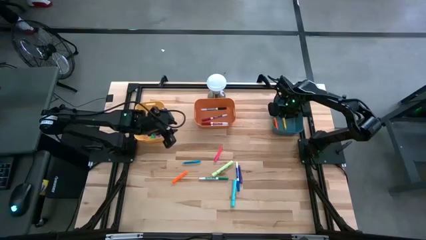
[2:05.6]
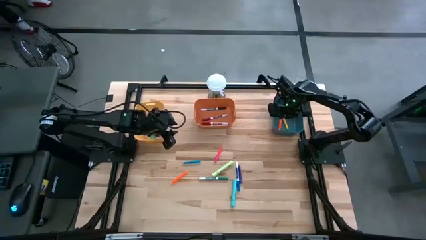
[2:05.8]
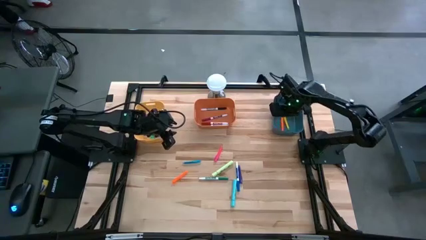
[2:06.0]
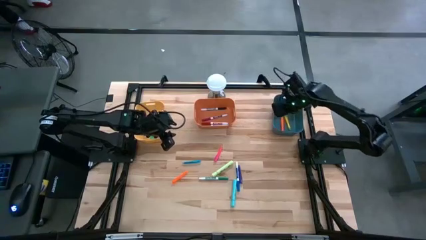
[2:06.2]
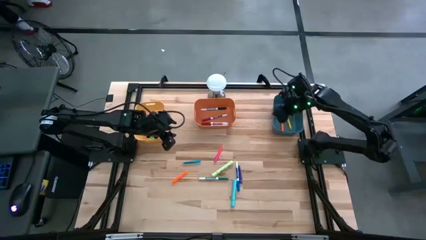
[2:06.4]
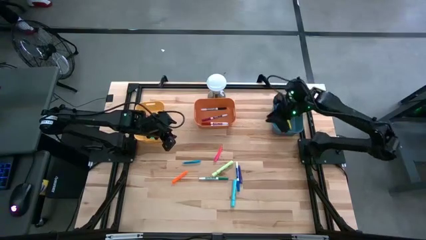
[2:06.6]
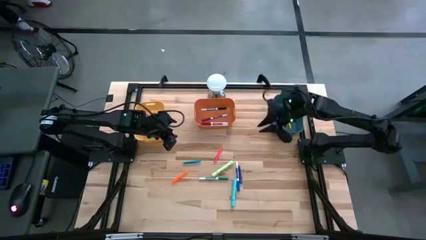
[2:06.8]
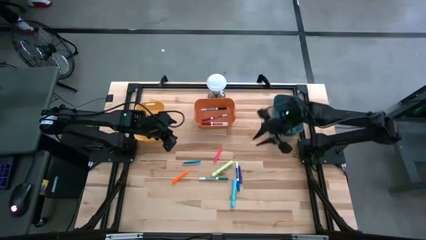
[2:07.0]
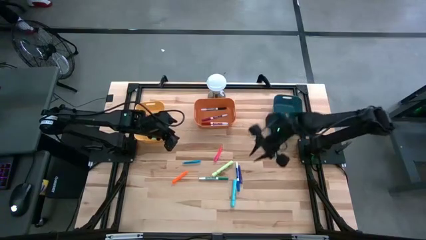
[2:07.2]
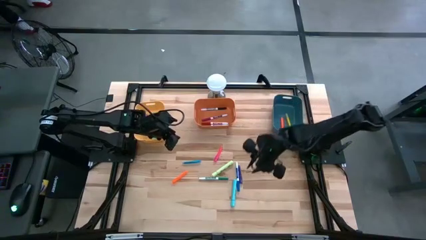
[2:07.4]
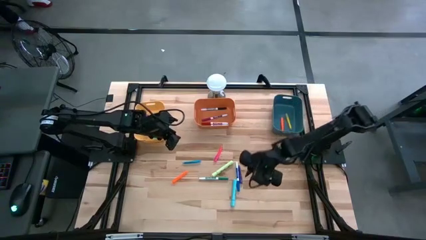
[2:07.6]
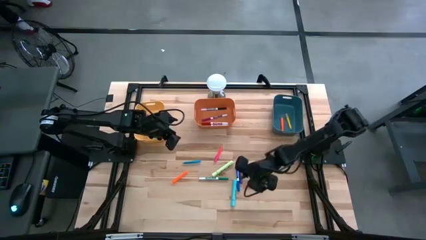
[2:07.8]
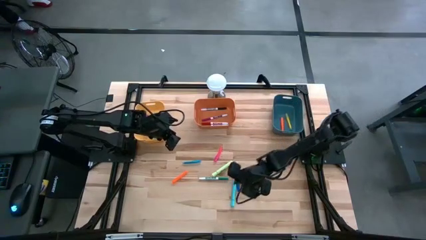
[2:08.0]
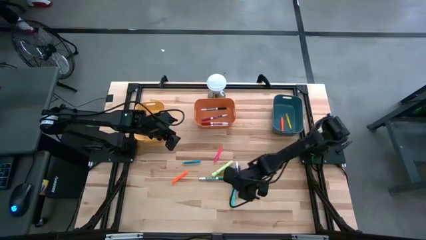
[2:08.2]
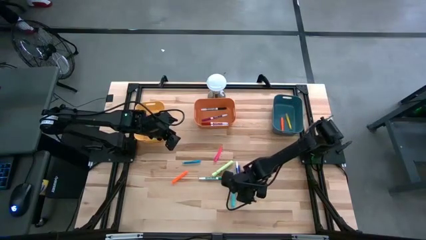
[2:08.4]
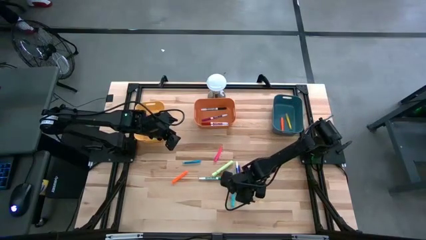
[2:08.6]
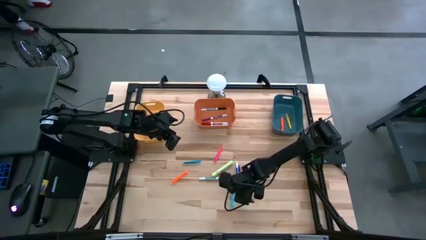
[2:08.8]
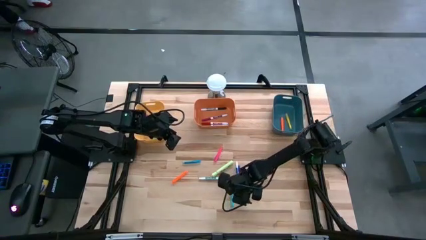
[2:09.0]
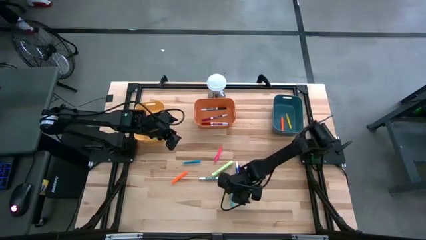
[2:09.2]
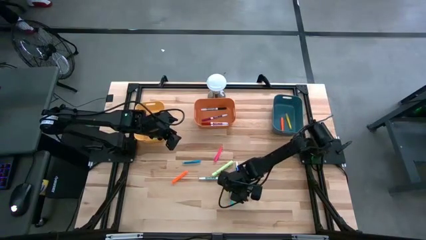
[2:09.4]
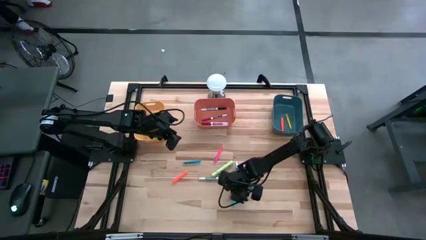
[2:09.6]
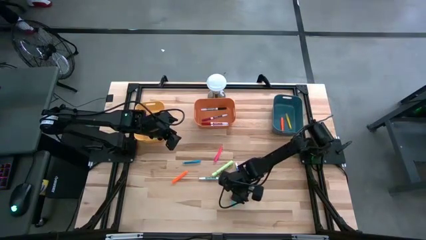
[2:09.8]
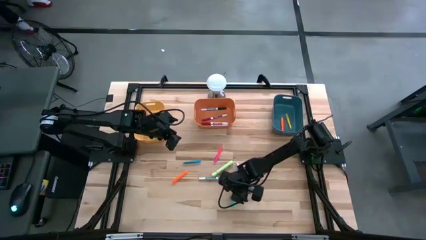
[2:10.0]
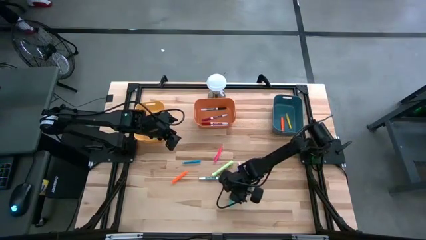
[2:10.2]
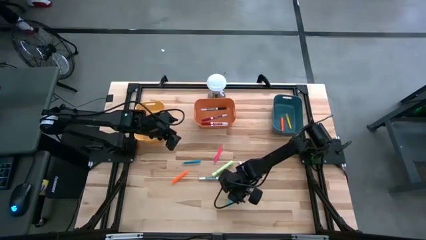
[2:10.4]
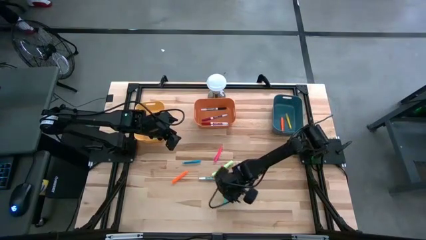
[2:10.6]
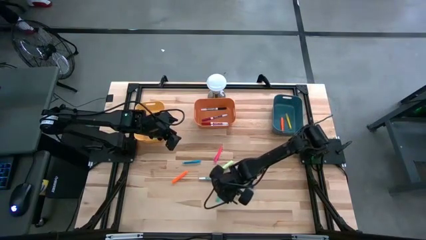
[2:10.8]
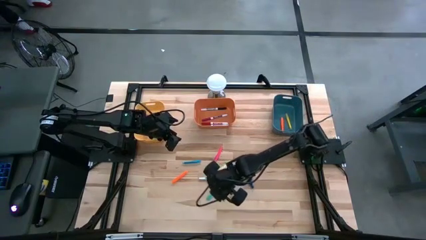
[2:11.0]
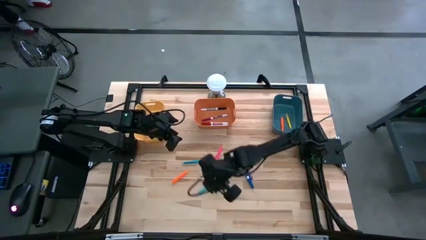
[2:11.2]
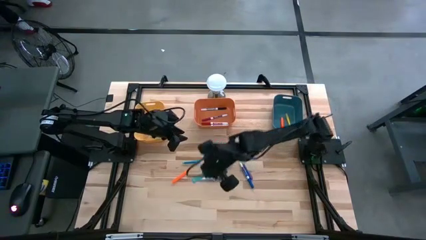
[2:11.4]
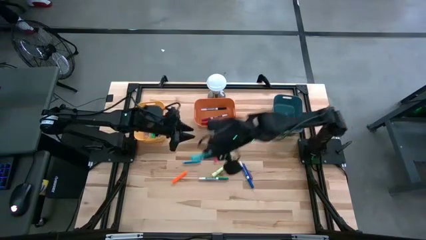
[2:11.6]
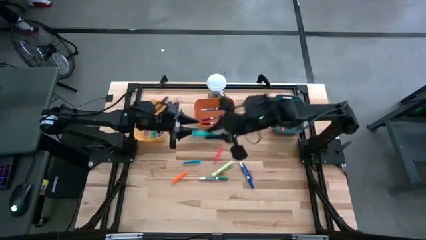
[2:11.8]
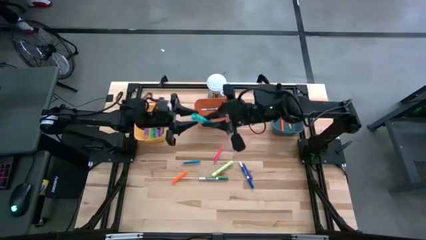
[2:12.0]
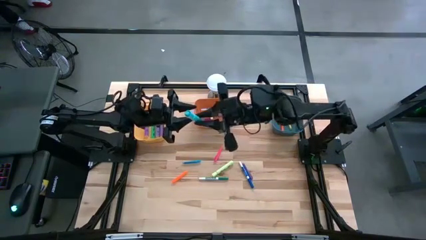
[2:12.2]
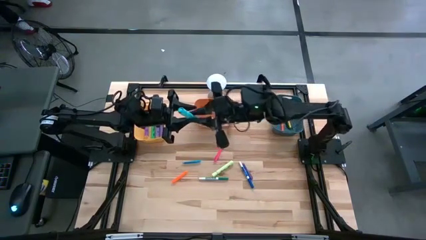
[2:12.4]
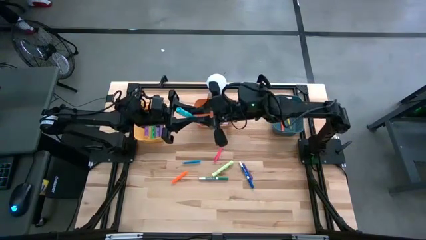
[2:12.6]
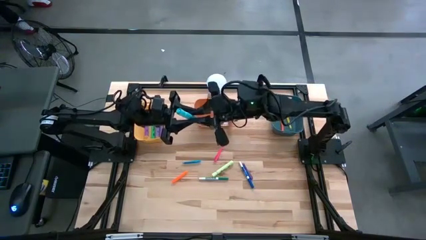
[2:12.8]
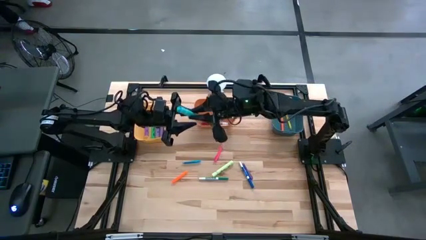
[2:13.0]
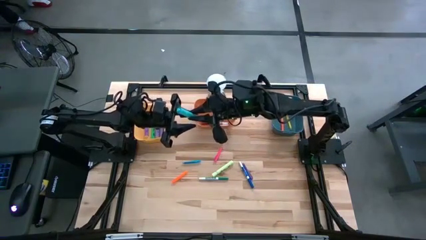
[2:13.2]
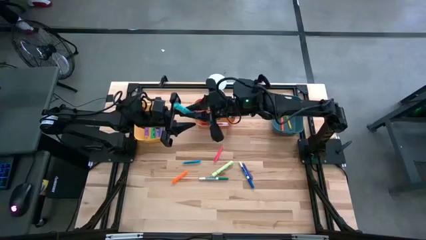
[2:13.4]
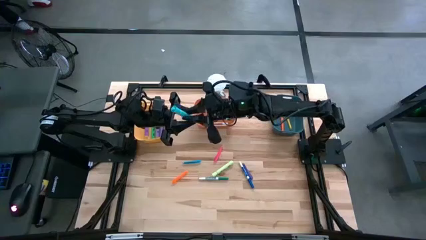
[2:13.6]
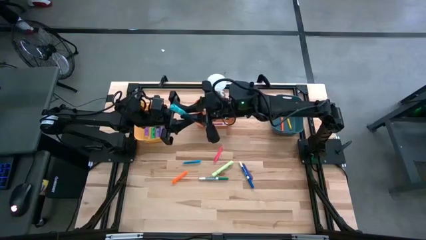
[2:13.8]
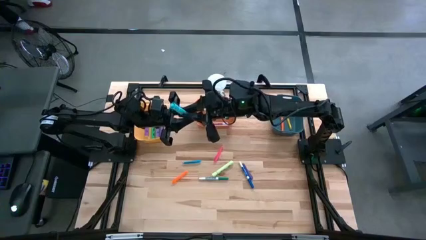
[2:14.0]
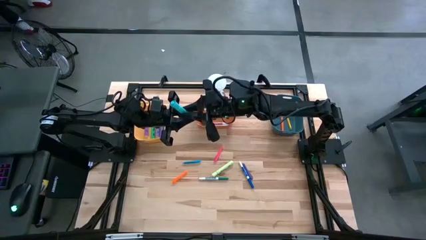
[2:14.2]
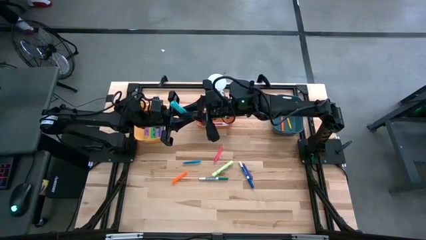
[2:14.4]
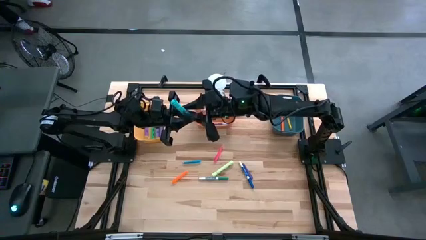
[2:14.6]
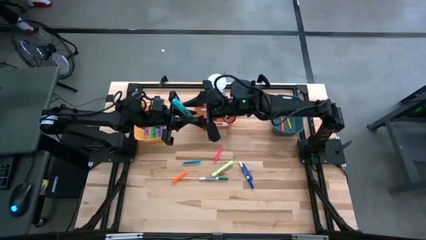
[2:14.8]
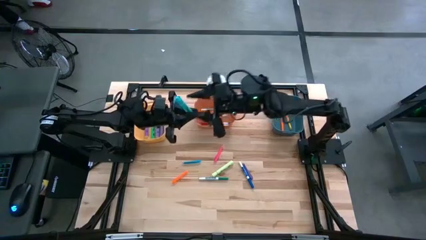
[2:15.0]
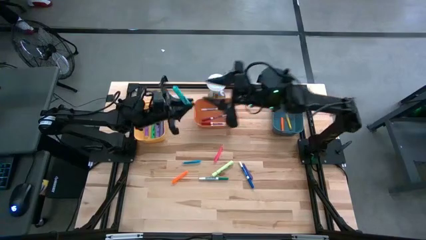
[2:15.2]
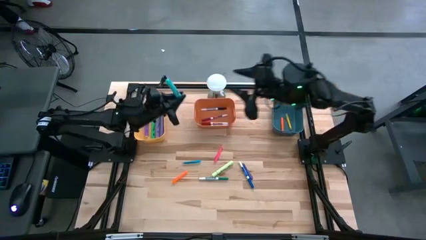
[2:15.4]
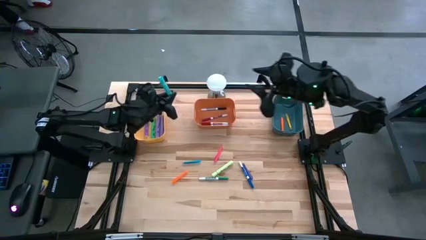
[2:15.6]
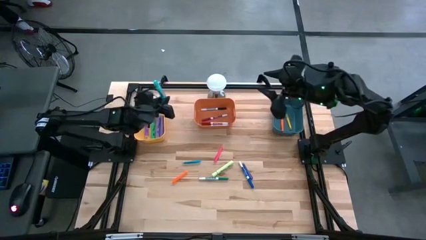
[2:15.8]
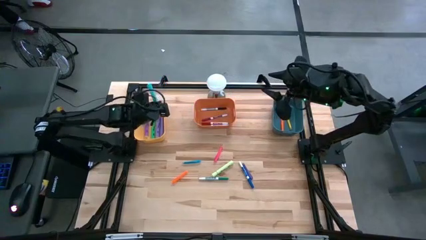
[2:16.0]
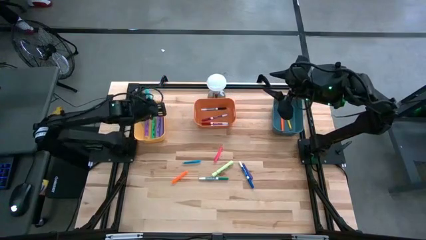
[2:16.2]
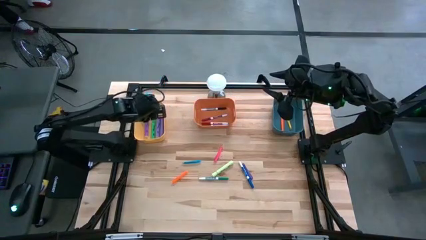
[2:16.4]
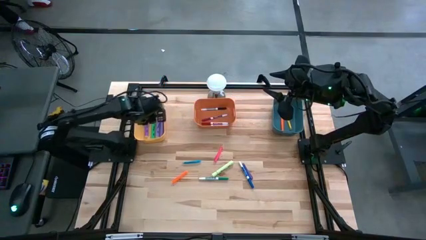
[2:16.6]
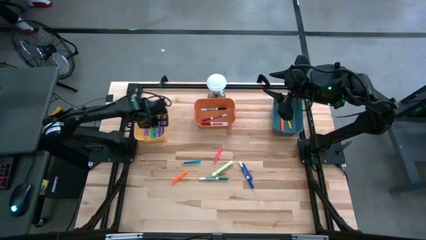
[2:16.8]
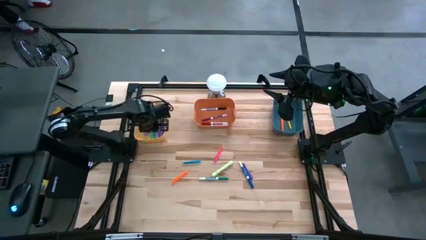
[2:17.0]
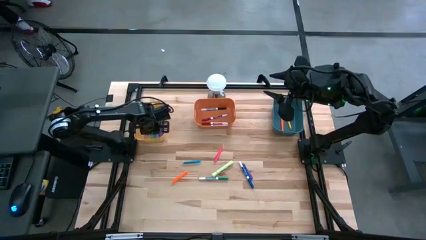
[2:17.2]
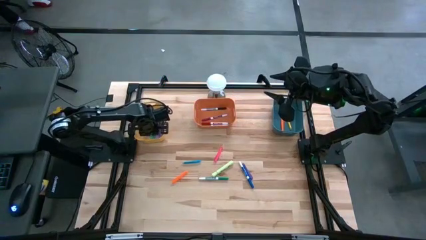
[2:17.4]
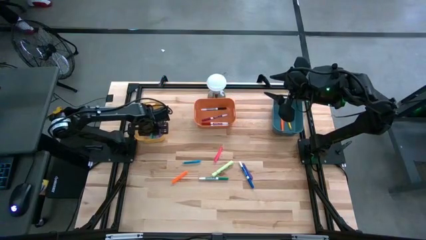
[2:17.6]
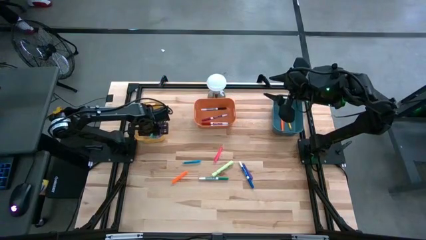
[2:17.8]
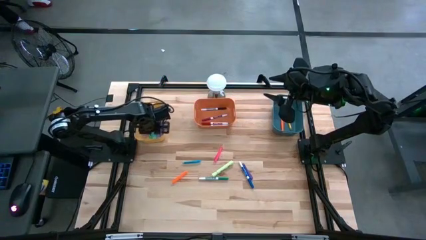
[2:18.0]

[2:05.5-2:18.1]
Task: Pick & Place Markers
Put the blue highlighter pen into the yellow bin

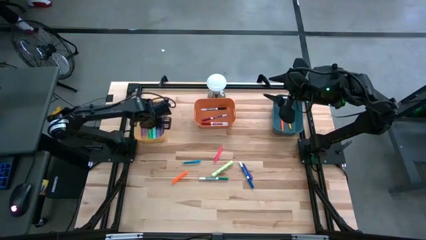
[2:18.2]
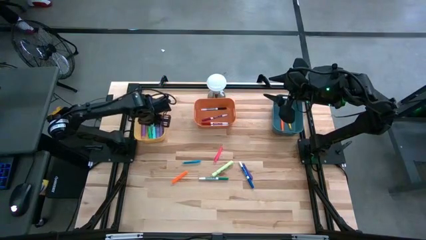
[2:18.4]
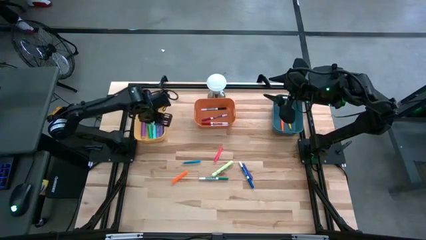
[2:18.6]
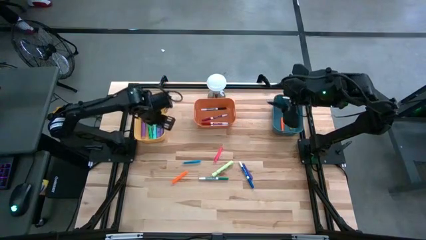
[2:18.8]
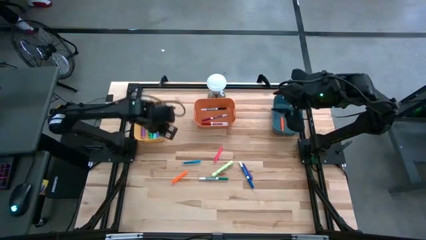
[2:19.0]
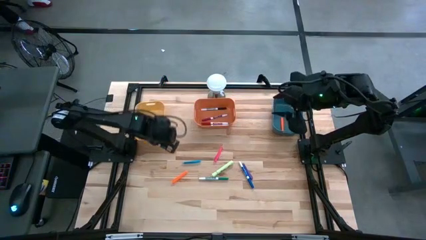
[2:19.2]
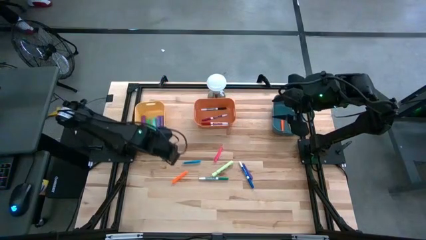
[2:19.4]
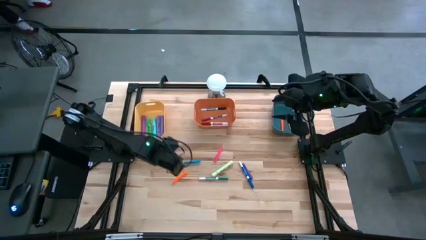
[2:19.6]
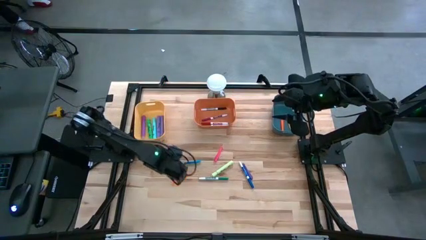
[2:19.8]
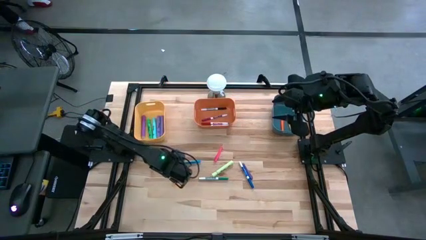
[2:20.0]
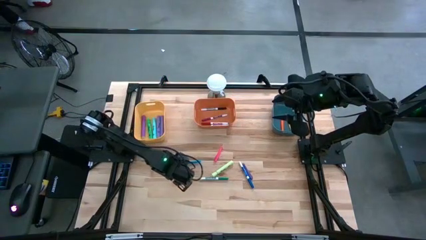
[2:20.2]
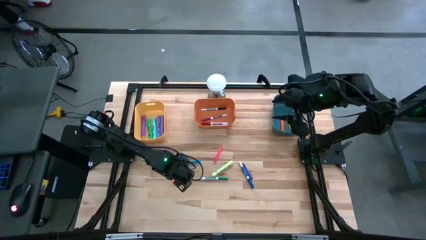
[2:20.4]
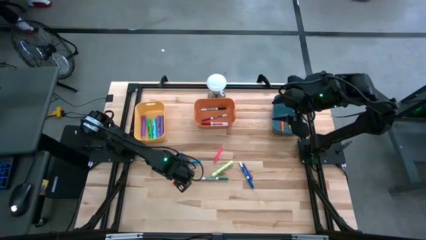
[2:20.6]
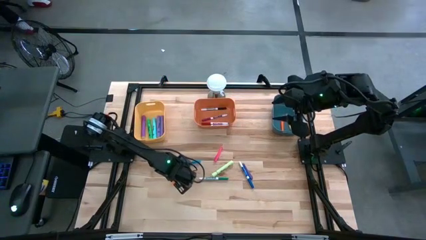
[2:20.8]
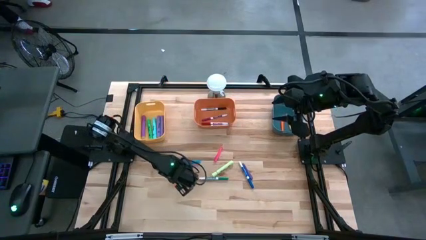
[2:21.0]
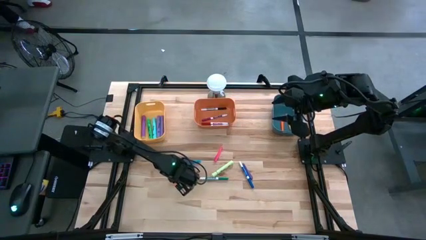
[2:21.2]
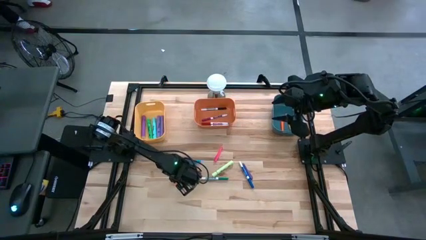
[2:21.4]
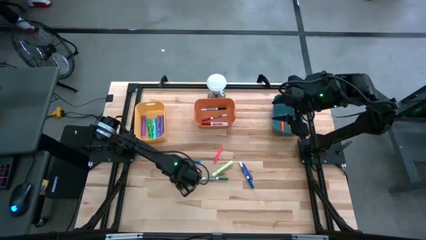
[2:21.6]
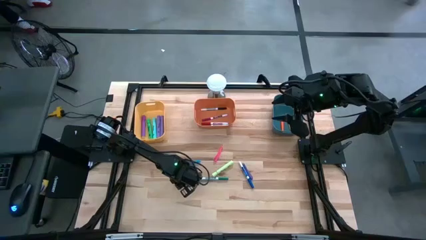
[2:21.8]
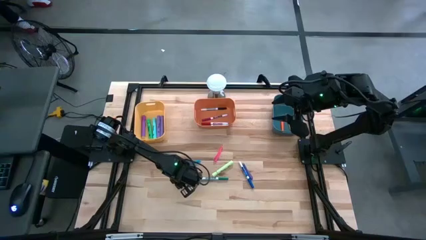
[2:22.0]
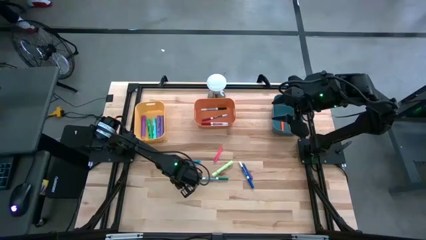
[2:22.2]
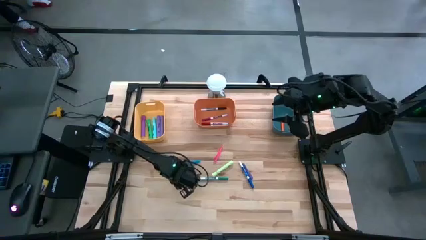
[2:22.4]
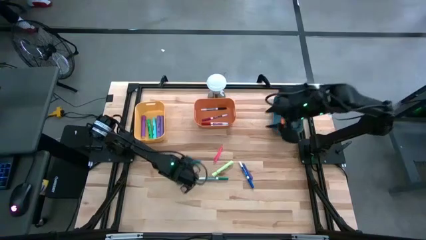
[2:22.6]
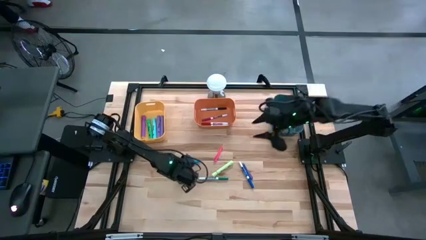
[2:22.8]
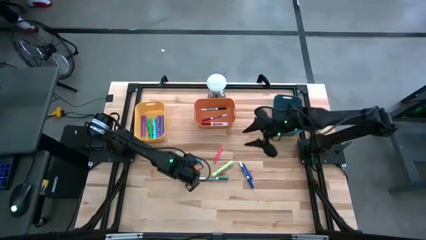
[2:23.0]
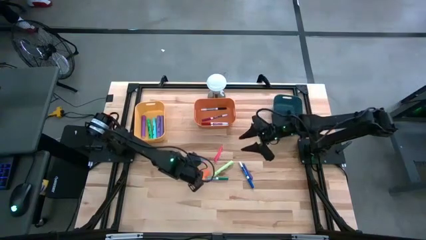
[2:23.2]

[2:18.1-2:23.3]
Put the orange pen into the blue bin
